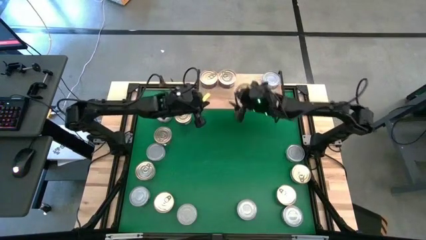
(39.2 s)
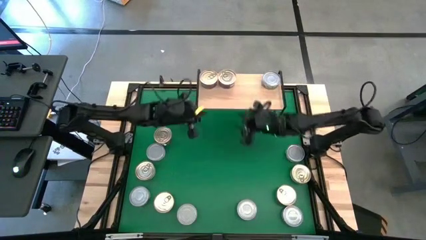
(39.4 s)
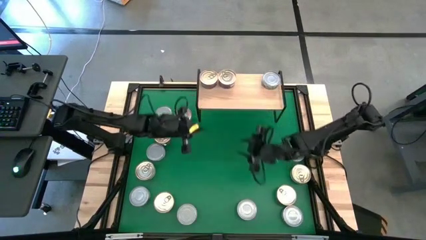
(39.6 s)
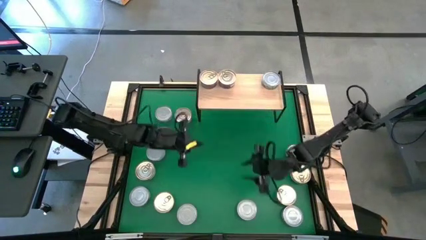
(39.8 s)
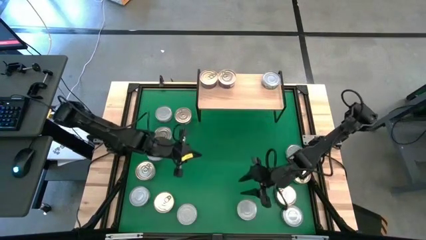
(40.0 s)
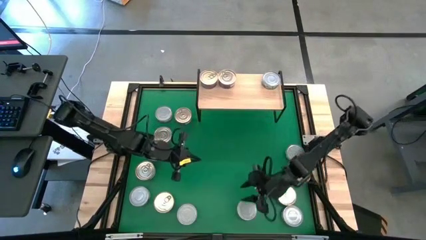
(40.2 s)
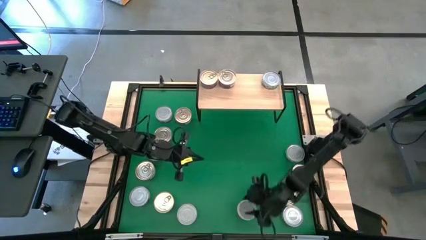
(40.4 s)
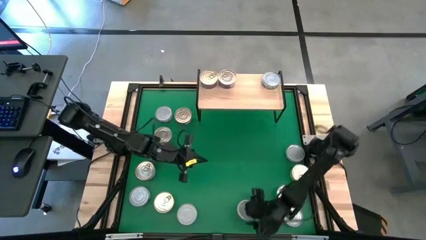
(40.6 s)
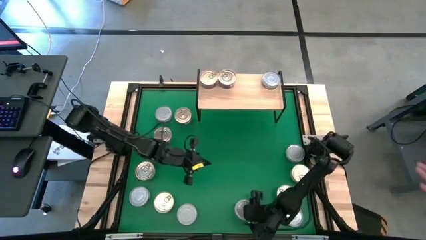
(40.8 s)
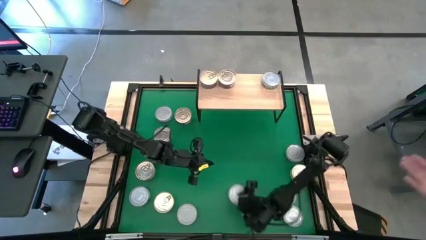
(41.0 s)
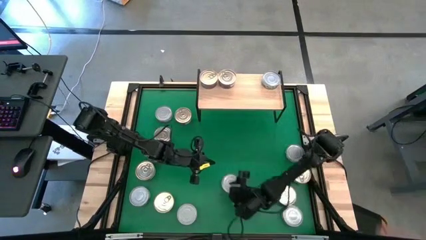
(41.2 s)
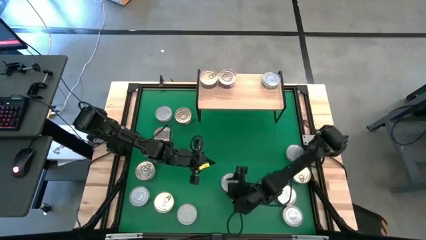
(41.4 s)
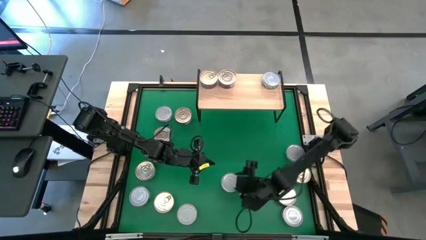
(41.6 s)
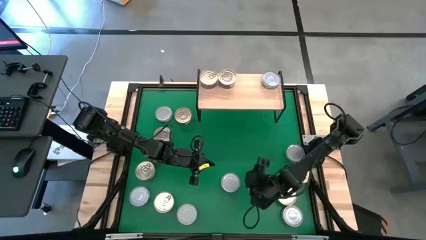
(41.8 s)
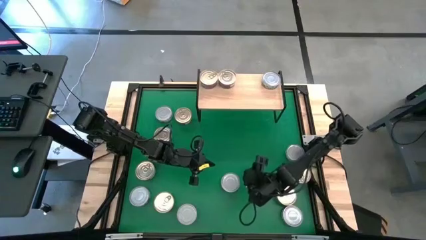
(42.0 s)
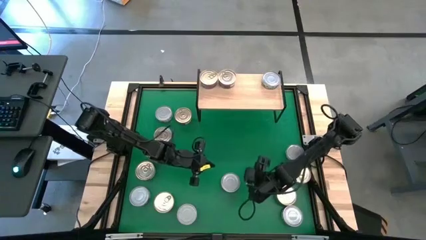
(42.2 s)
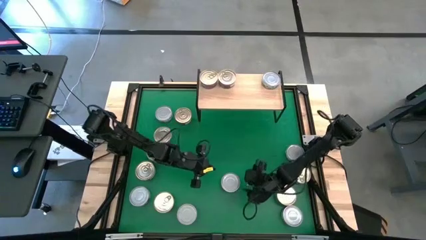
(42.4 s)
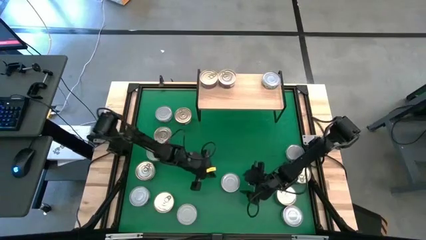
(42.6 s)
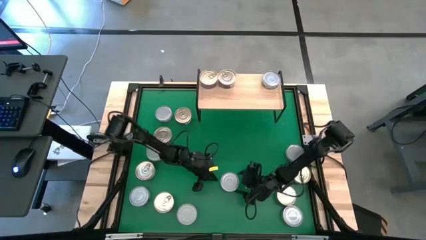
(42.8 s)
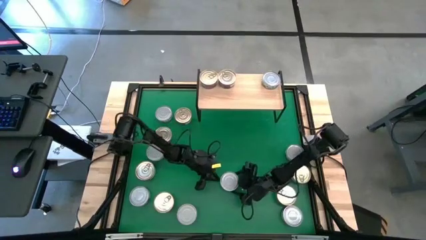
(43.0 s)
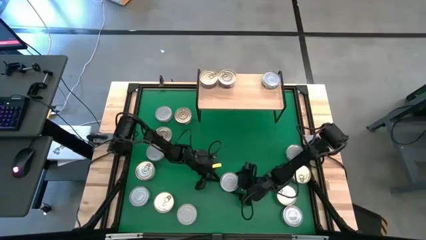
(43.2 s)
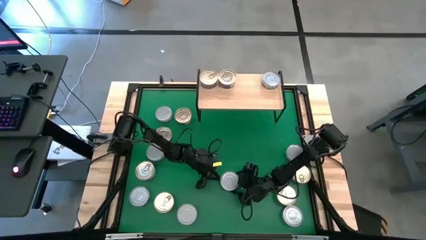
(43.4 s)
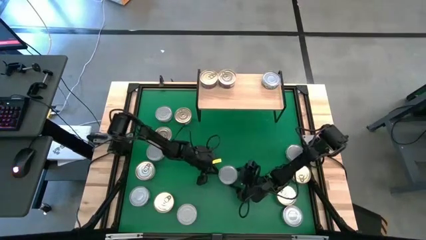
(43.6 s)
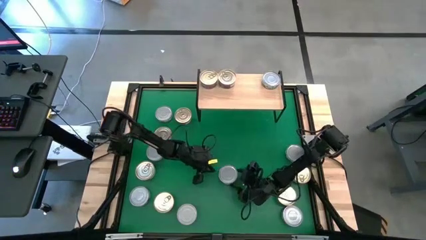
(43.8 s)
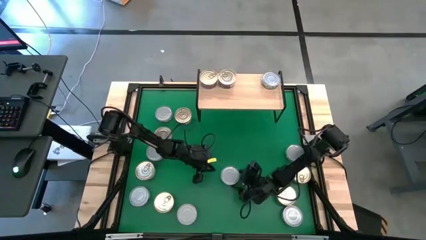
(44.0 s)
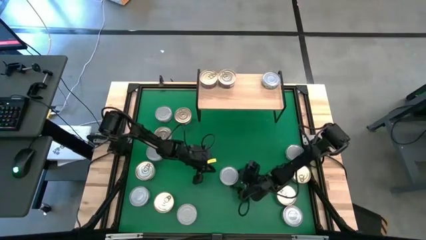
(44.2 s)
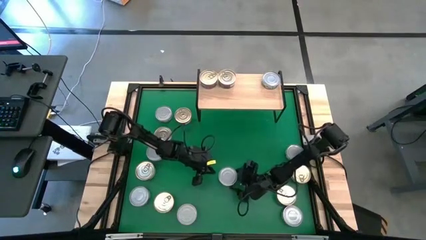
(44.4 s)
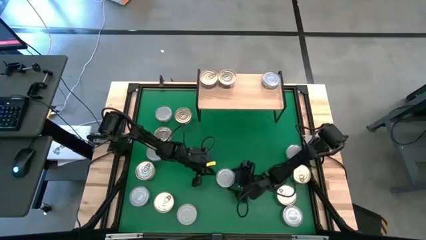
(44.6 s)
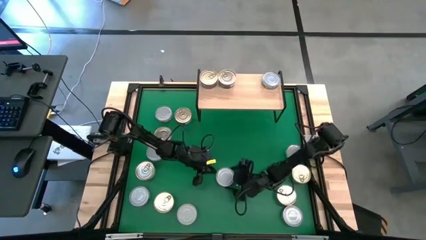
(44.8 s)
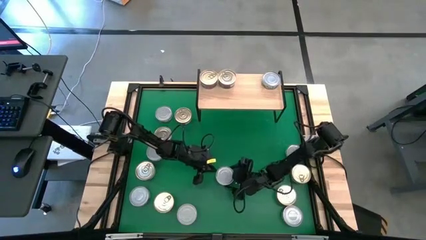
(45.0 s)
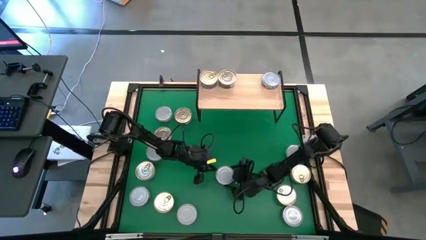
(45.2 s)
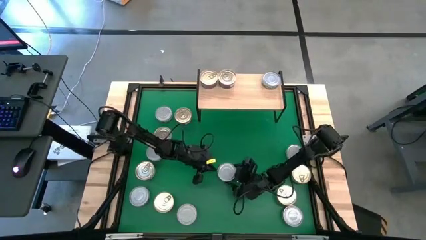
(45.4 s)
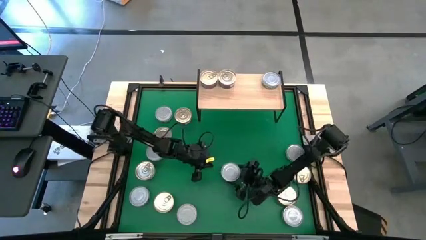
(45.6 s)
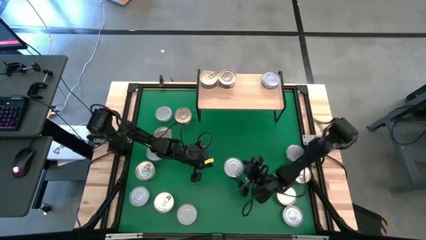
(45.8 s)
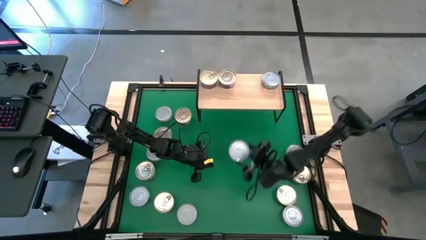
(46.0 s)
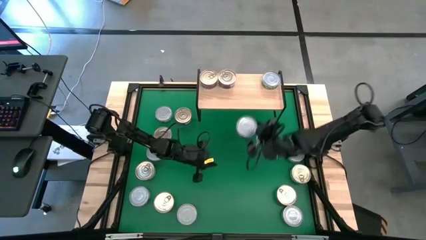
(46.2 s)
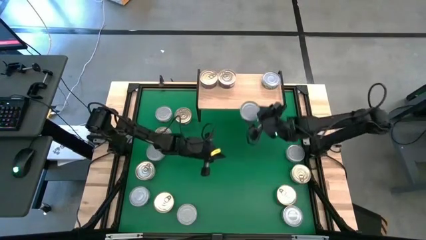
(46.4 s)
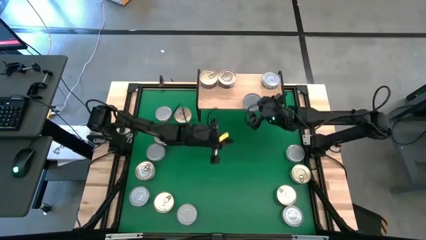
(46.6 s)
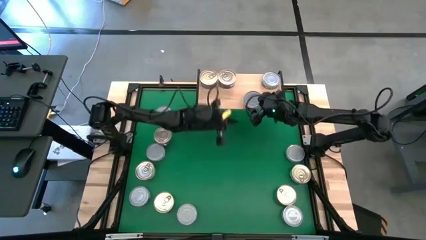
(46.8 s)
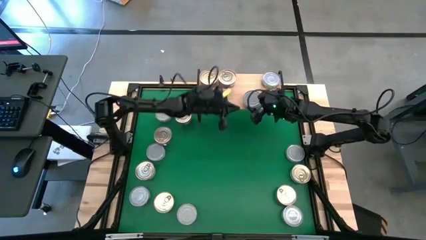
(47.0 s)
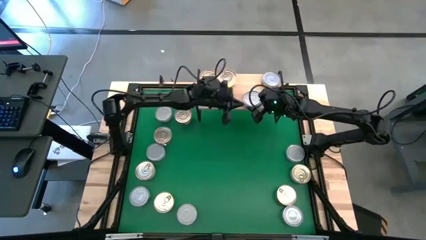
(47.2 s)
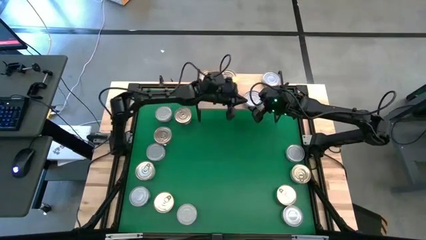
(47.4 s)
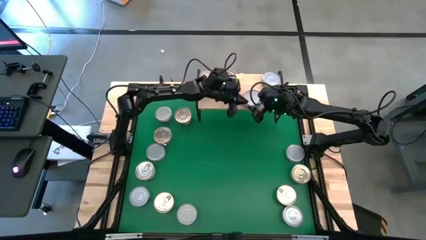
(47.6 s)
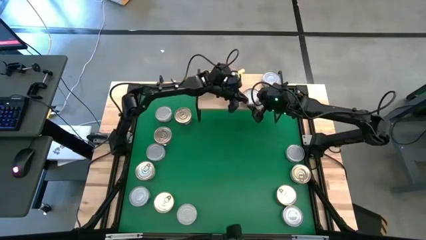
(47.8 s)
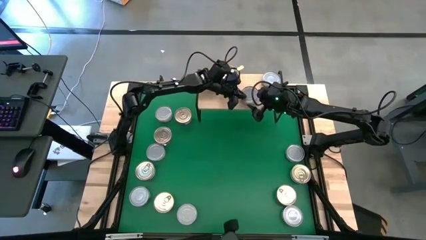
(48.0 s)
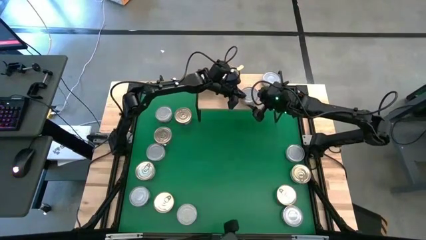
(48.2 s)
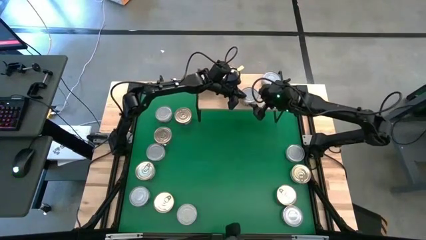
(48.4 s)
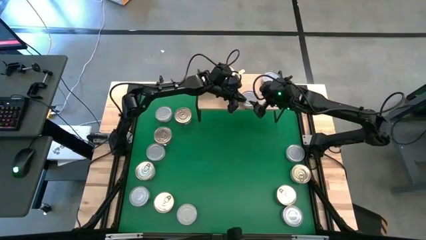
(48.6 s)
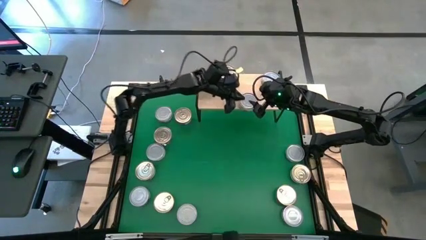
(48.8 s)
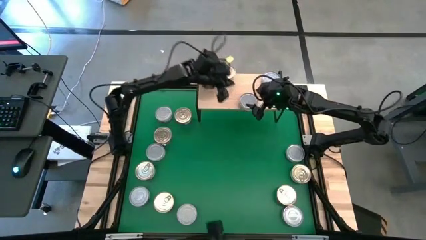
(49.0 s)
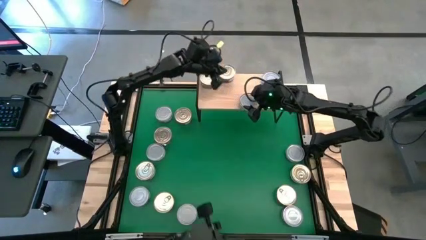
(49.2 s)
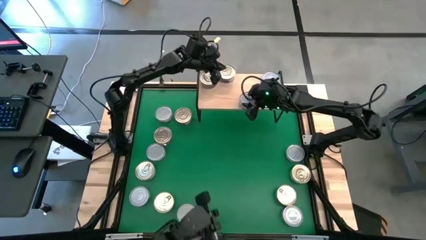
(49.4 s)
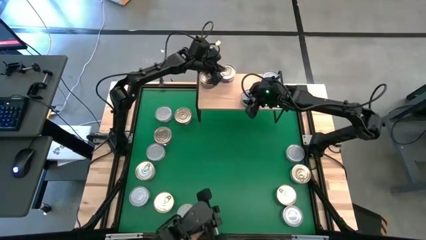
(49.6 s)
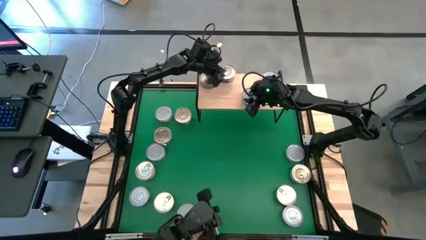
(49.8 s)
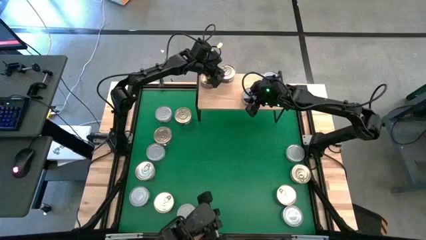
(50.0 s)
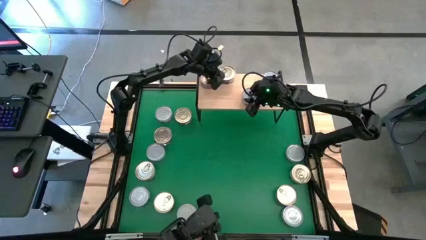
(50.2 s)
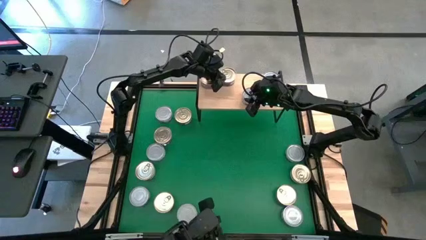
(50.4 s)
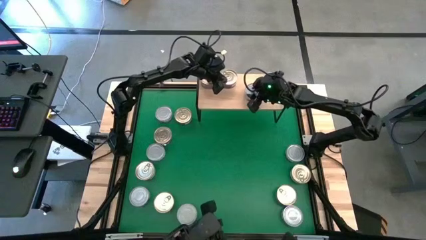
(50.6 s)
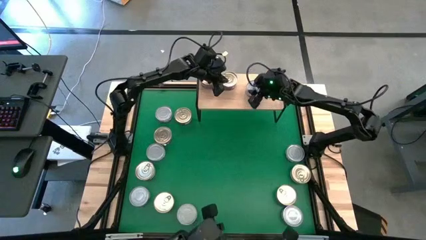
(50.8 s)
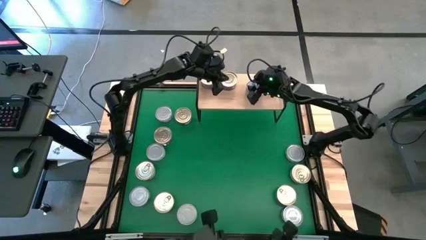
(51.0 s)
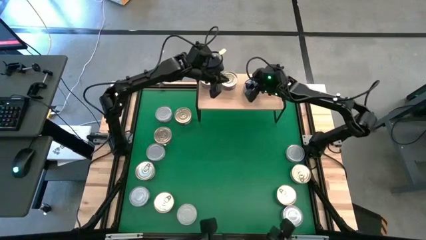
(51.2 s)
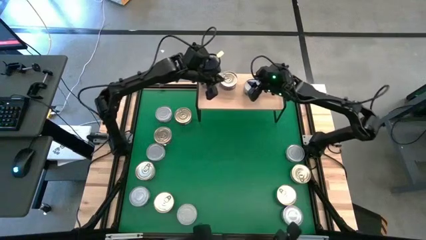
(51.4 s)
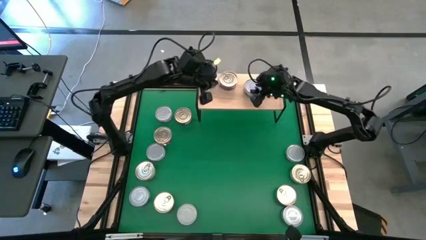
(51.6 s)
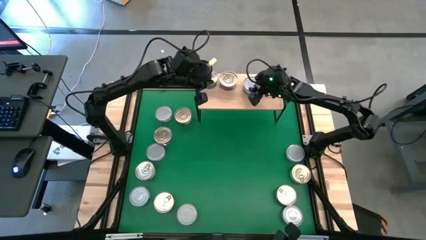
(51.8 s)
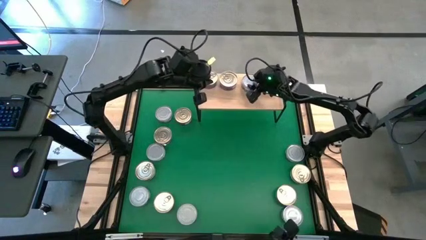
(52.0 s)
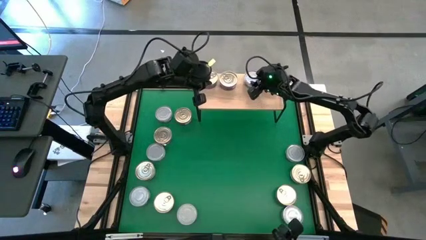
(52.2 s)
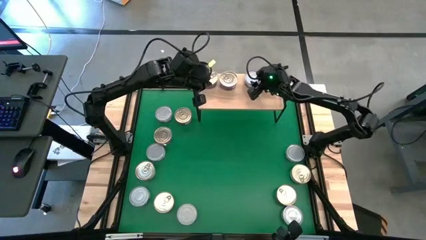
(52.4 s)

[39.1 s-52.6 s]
Task: Stack canned seafood by type on shelf
Put the green tuna can on the shelf

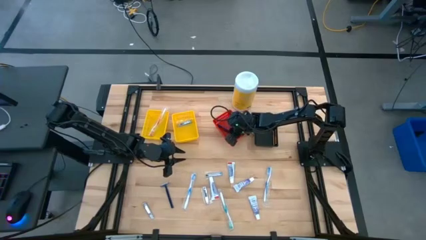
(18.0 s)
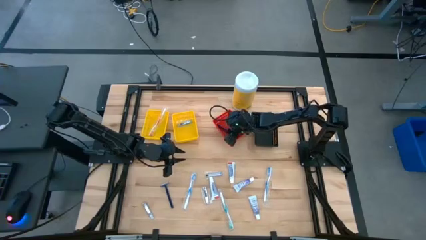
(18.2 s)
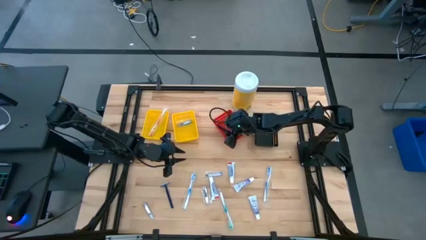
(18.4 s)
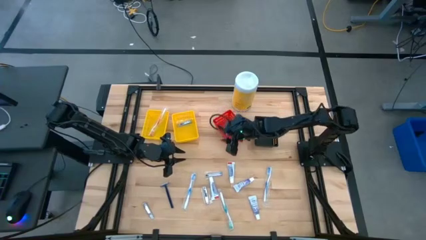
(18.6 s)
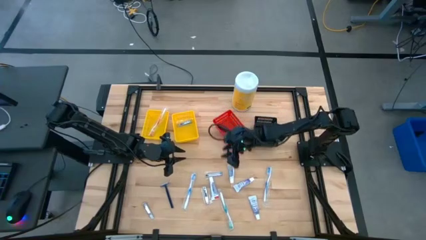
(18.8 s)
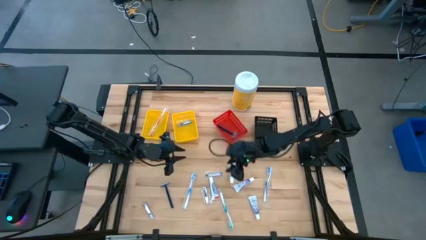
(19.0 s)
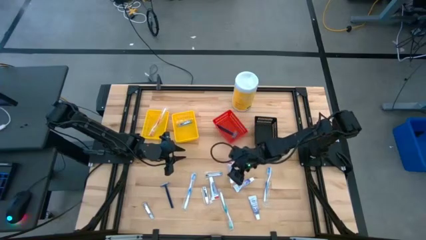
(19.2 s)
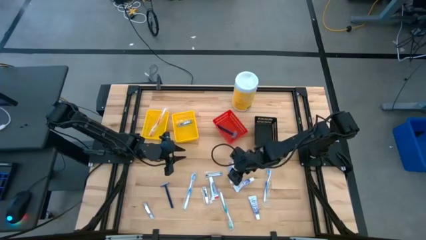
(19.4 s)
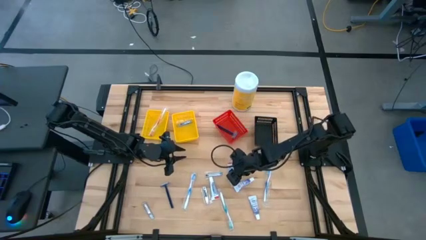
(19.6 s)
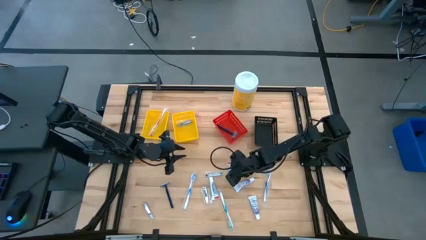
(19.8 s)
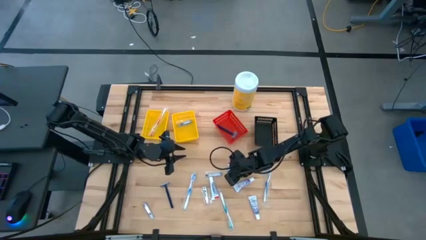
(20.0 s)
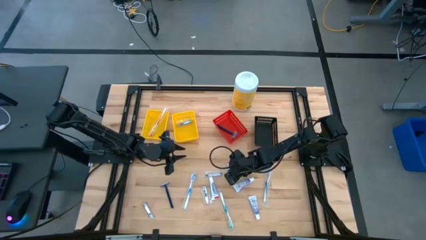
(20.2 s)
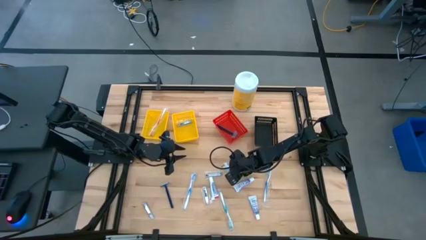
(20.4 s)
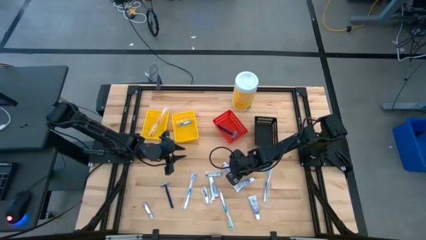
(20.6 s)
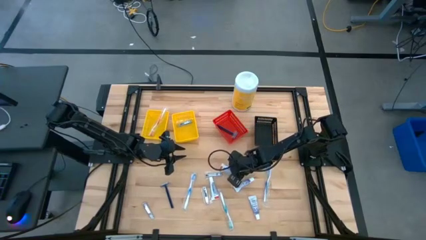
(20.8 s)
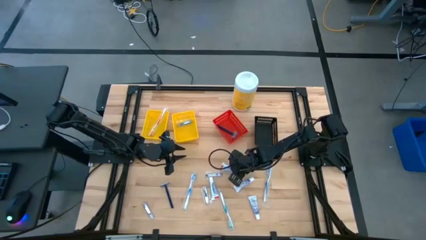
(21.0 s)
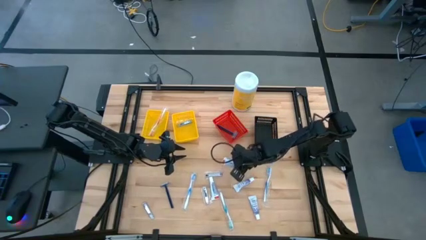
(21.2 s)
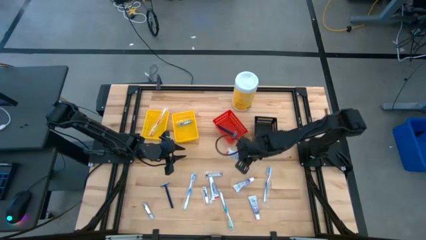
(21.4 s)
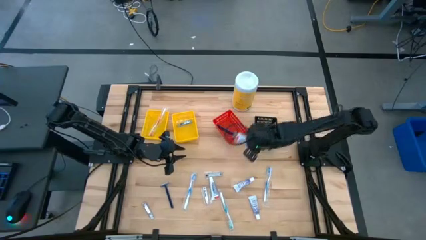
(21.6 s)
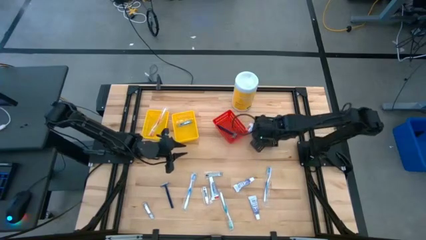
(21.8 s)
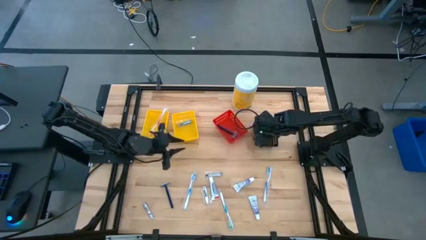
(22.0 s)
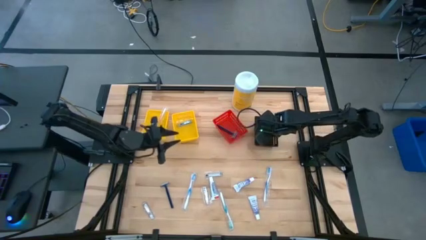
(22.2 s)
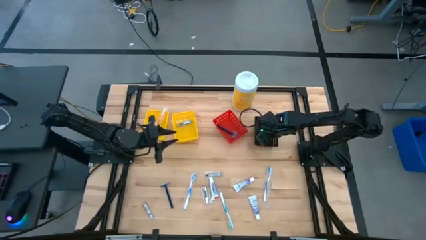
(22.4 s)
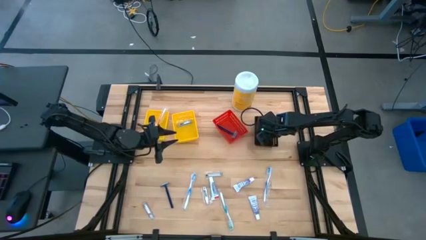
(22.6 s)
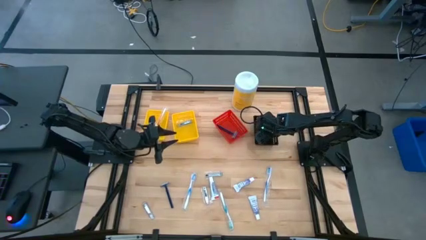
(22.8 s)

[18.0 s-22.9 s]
Task: Pick & Place Travel size toiletries
Put the white toothpaste into the black bin
